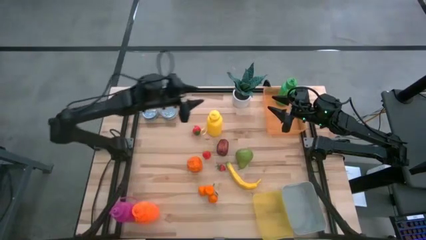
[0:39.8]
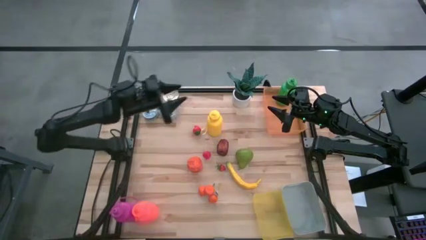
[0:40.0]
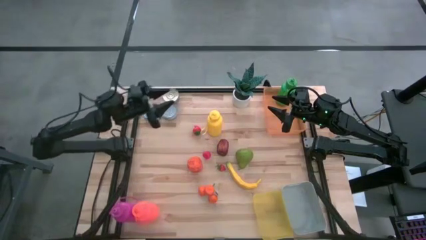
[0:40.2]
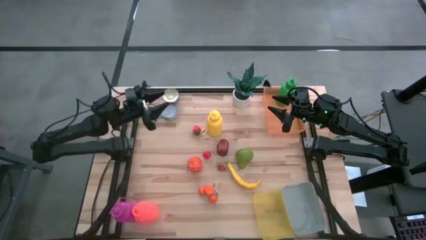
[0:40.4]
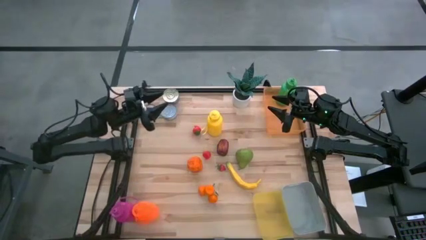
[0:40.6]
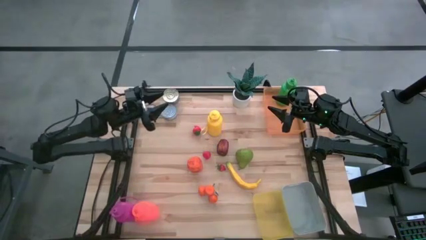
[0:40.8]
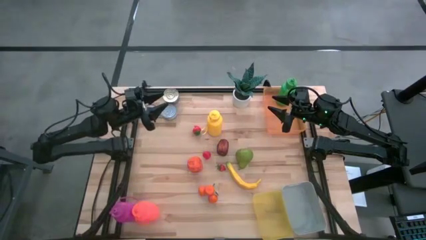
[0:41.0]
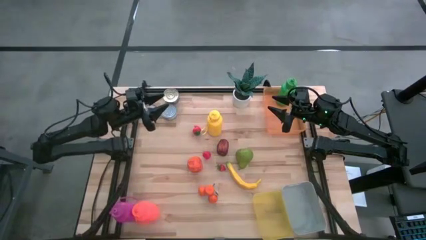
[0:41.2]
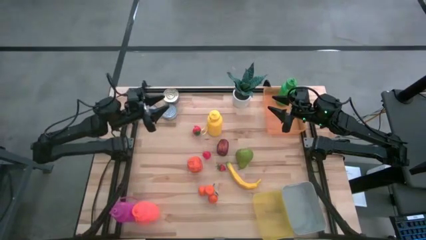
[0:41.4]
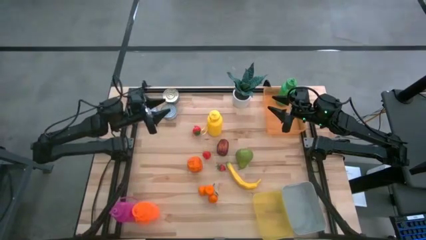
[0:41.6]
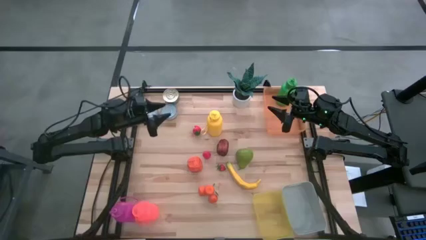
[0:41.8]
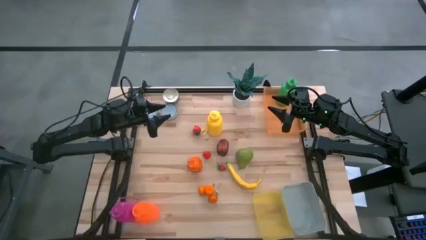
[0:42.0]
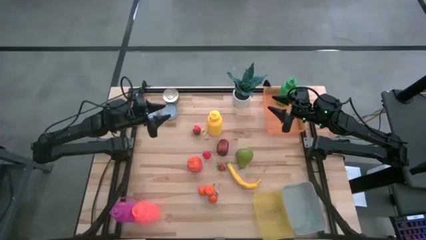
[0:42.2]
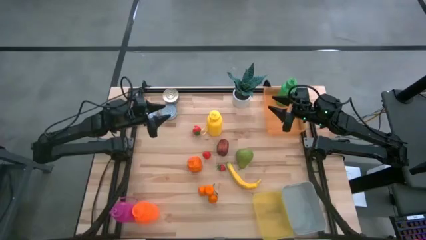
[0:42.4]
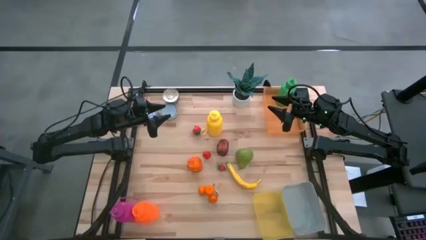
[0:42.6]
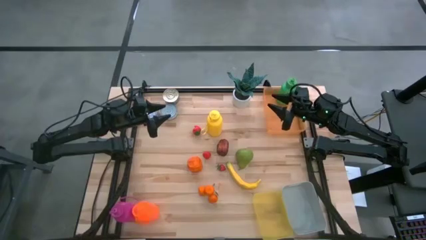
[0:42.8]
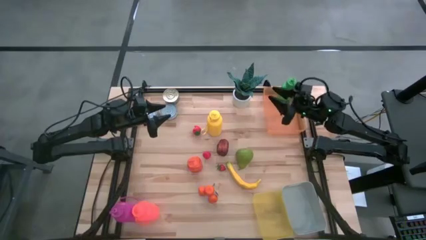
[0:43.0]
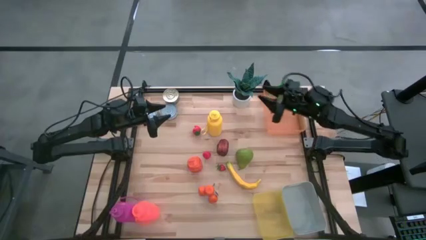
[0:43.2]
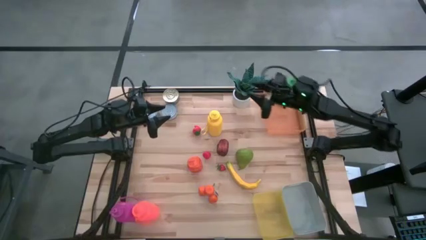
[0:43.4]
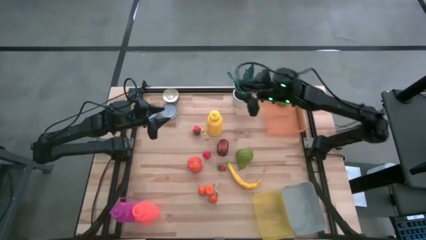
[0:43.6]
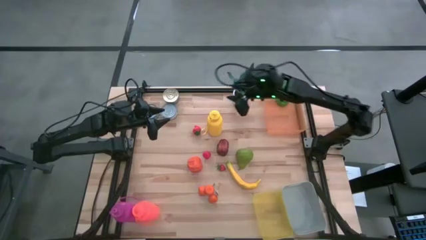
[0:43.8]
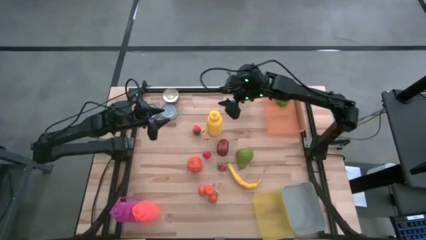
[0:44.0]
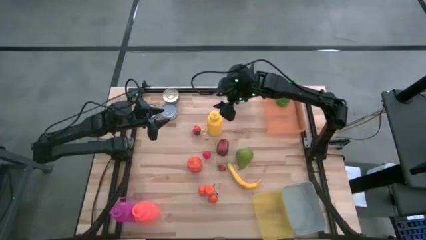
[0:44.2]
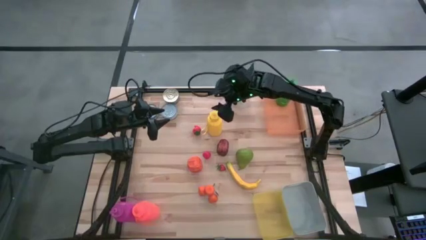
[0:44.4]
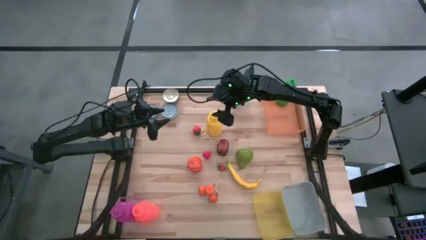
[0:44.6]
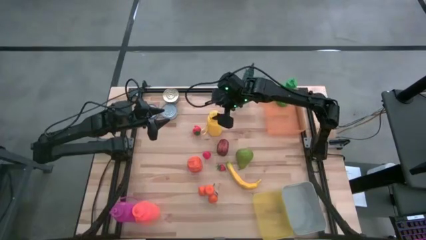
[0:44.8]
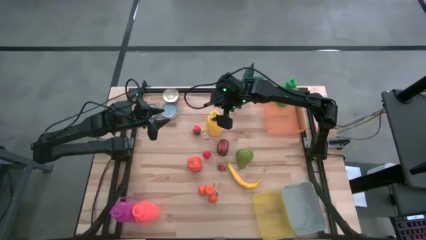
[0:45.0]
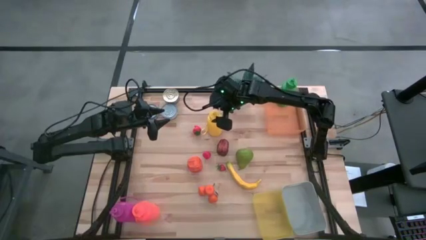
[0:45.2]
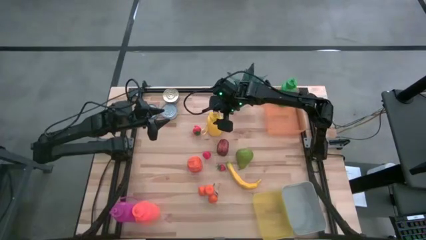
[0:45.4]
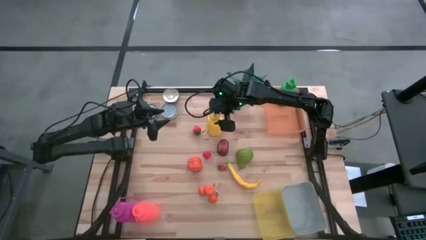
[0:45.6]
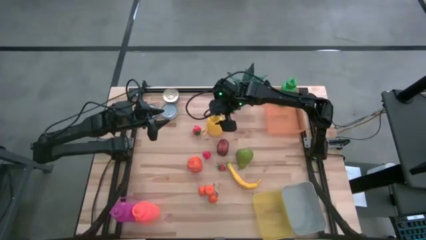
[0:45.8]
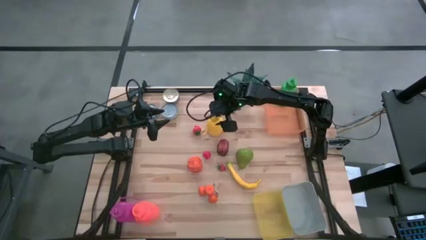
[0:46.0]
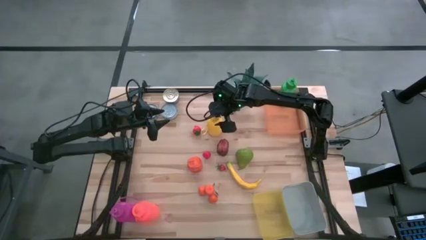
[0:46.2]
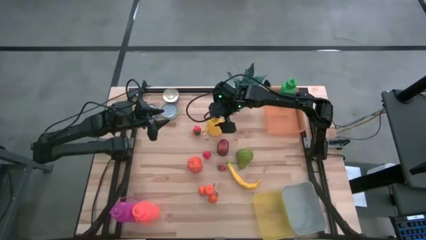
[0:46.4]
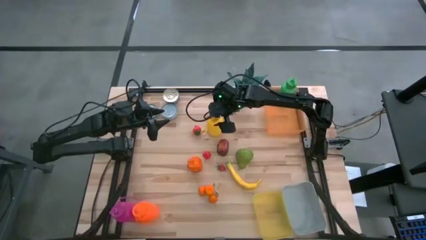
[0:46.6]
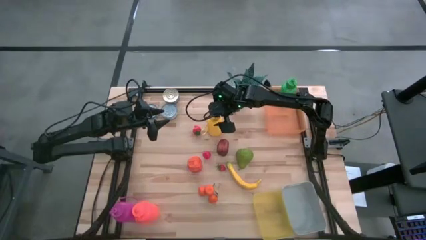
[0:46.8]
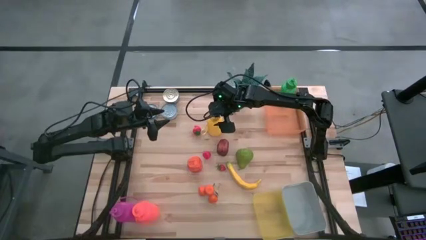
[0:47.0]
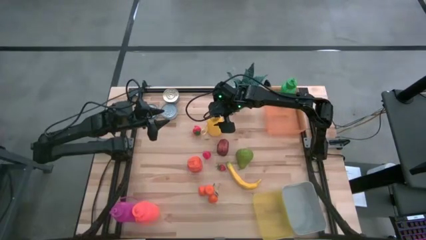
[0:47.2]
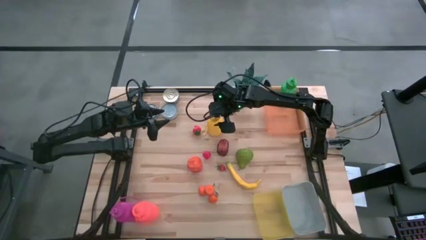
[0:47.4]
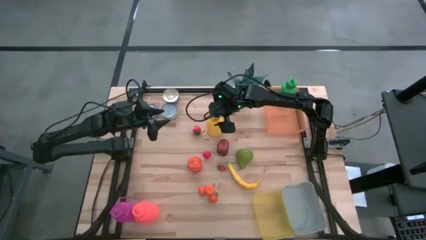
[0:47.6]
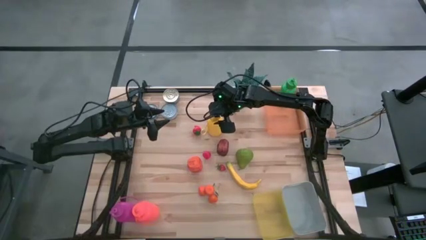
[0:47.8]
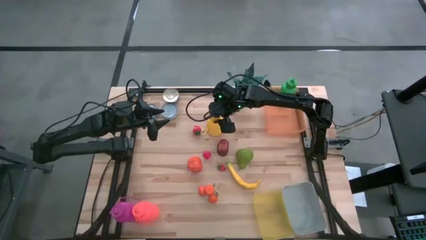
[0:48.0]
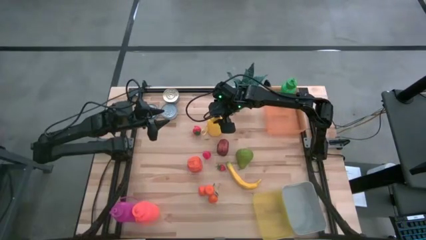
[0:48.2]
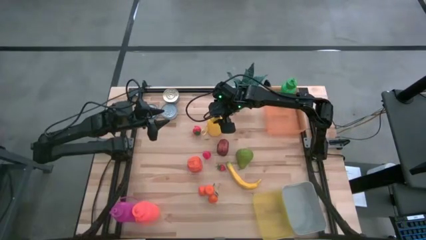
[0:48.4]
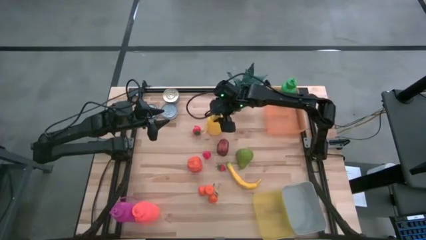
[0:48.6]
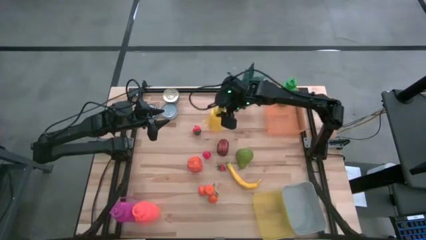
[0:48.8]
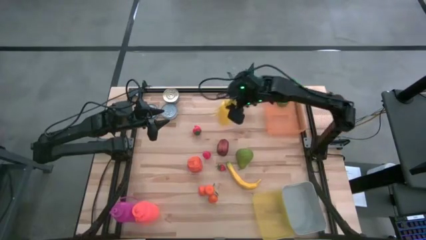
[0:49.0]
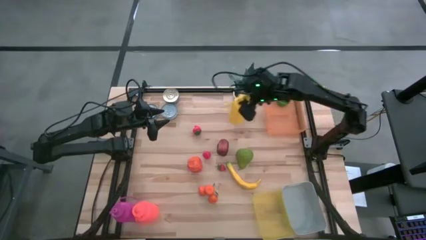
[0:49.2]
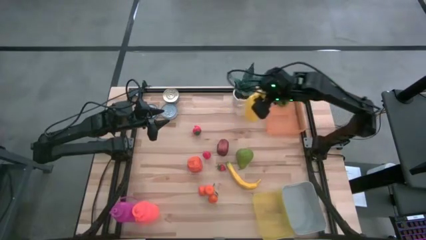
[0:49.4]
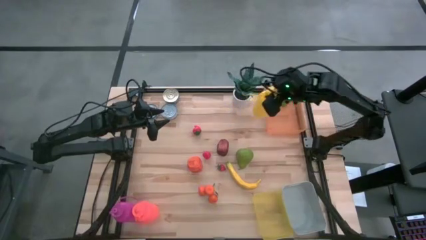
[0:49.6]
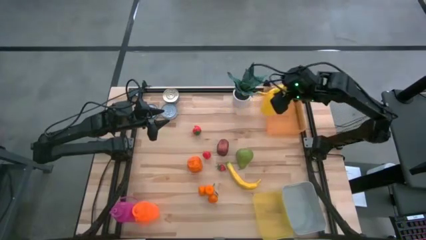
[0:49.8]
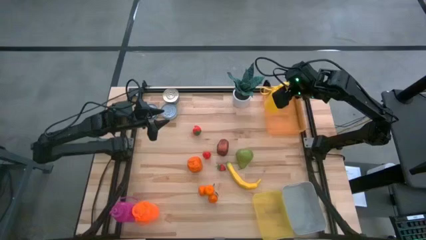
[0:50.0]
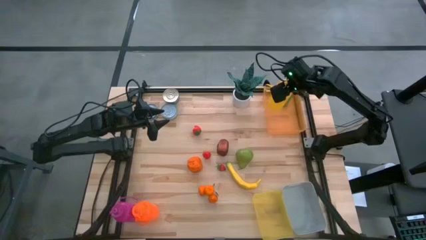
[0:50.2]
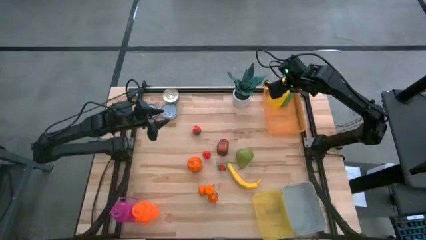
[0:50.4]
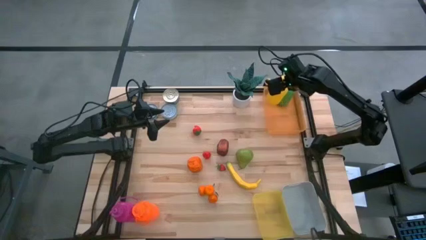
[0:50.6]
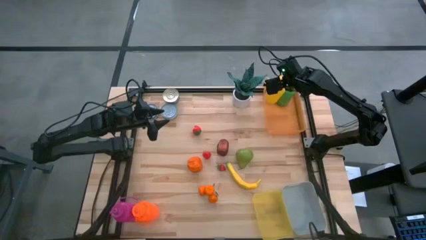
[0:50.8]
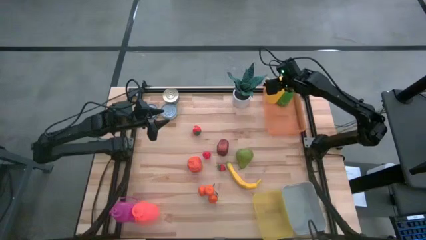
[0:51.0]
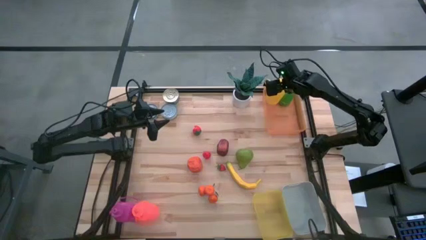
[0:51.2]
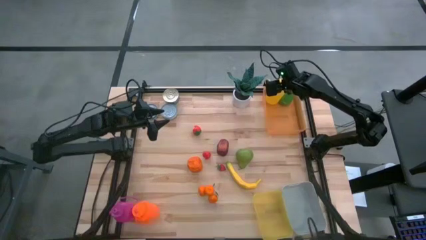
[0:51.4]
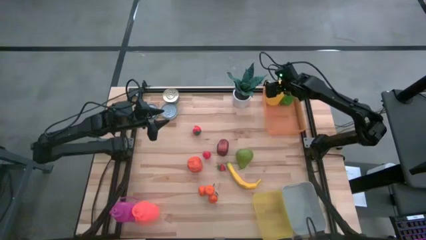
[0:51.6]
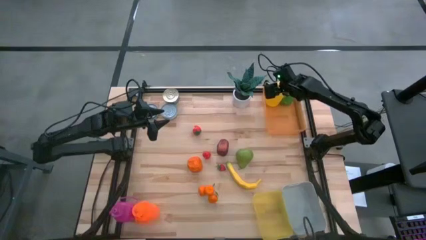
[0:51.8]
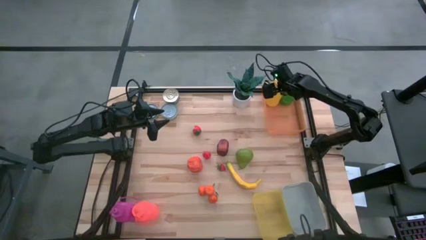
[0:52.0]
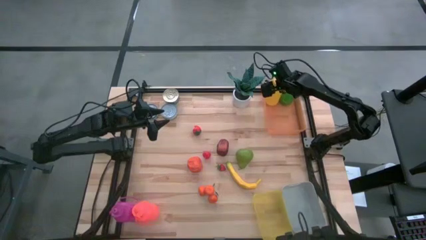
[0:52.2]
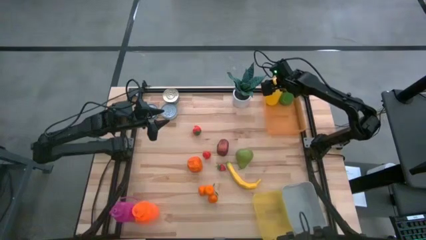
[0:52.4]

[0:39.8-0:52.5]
Task: Pick & Place Food Item
Put the yellow water bottle into the orange bin
